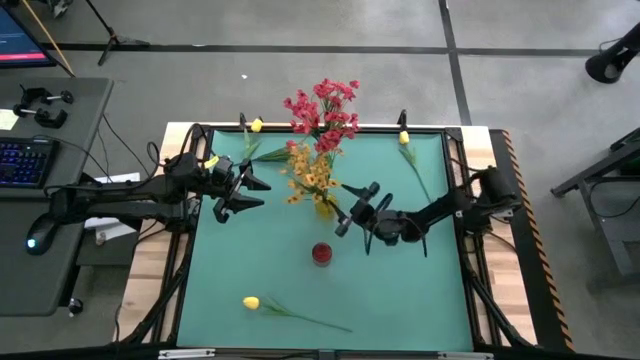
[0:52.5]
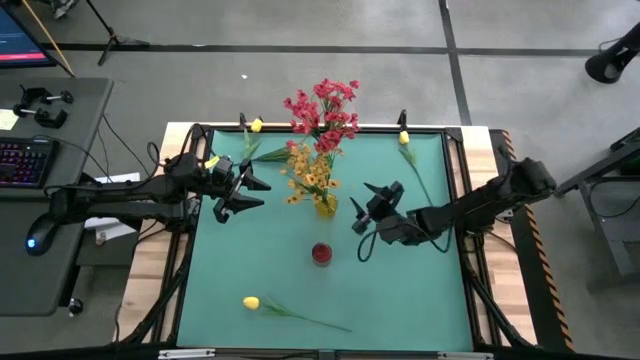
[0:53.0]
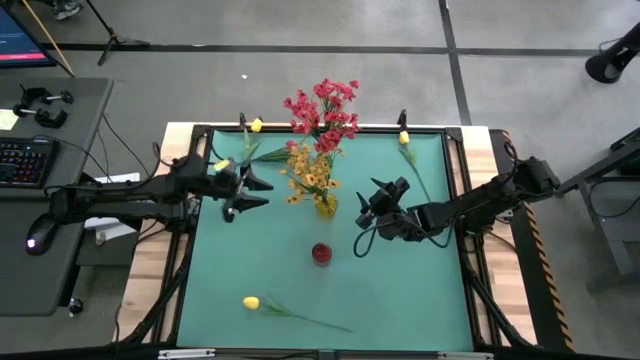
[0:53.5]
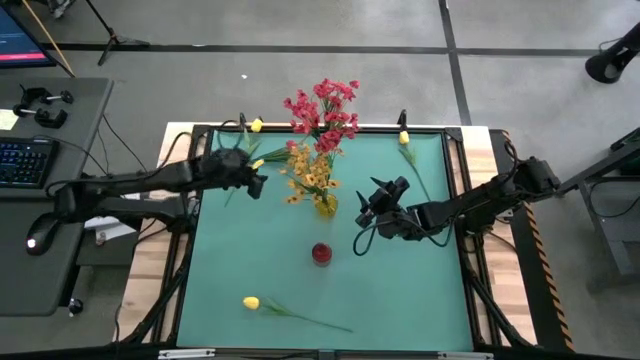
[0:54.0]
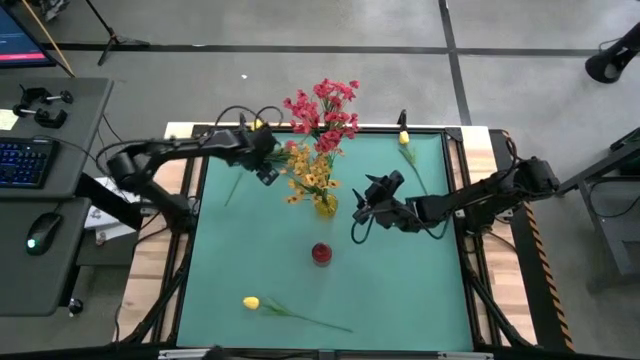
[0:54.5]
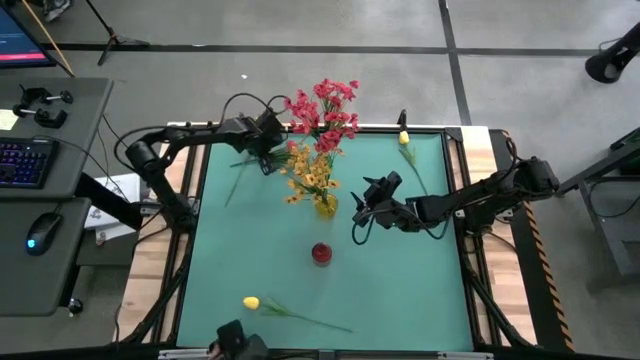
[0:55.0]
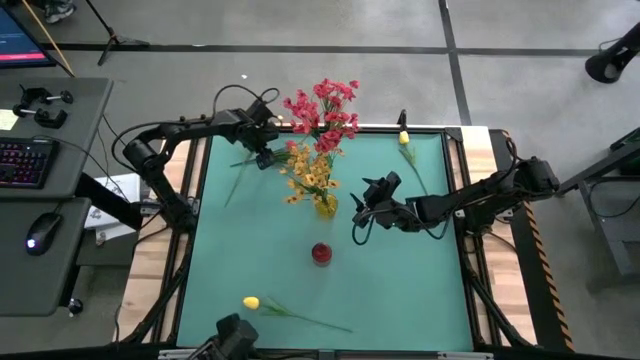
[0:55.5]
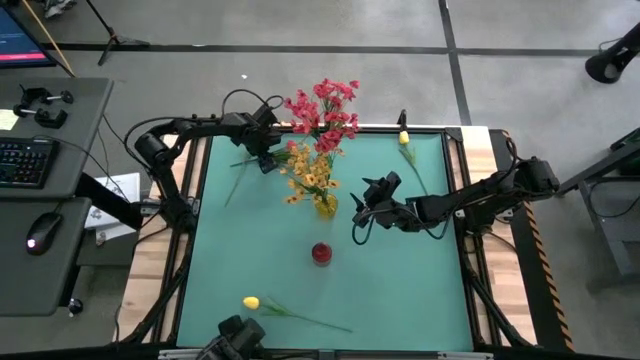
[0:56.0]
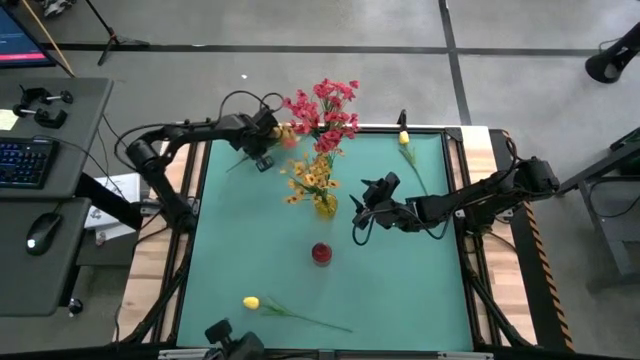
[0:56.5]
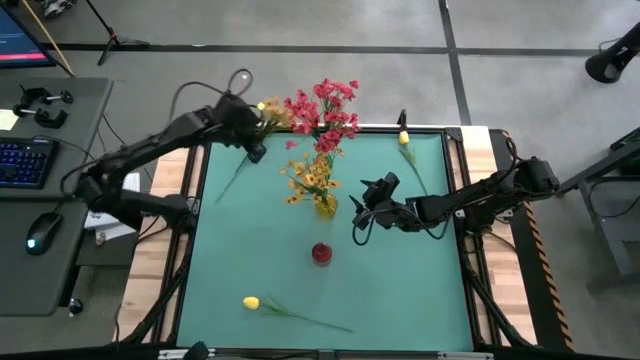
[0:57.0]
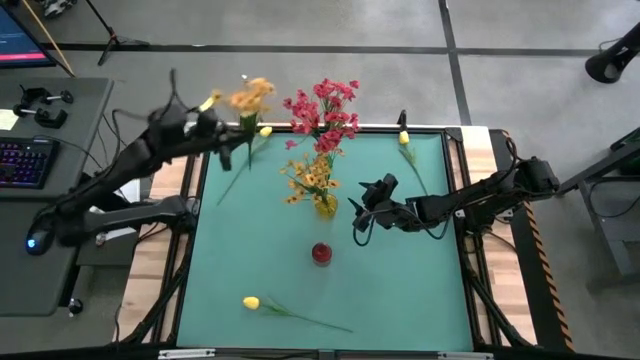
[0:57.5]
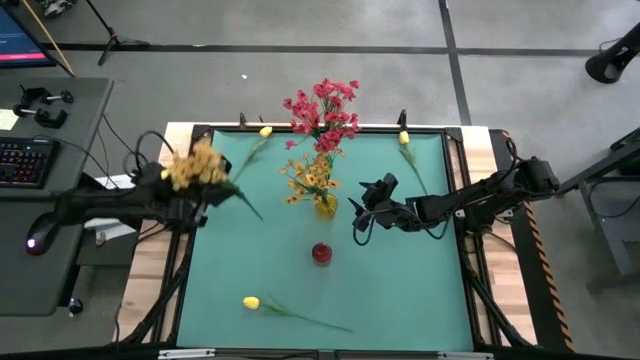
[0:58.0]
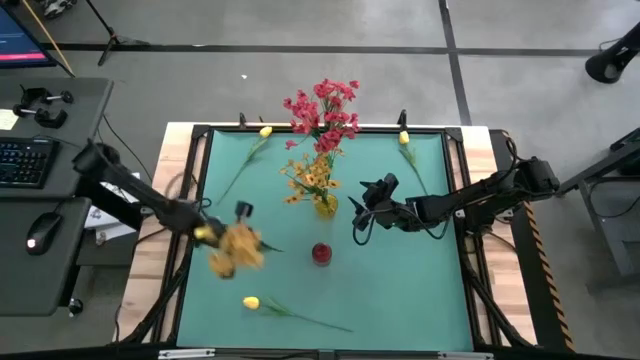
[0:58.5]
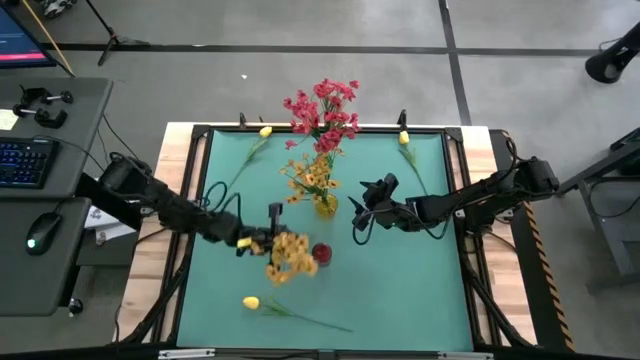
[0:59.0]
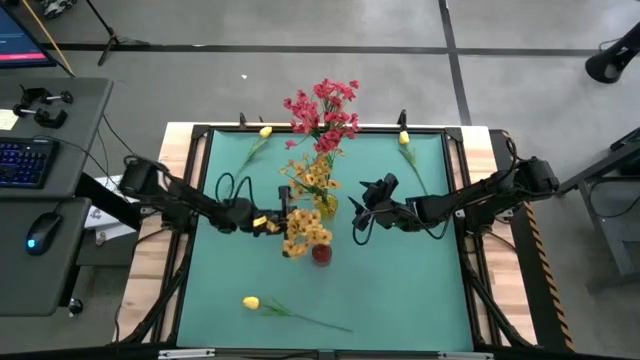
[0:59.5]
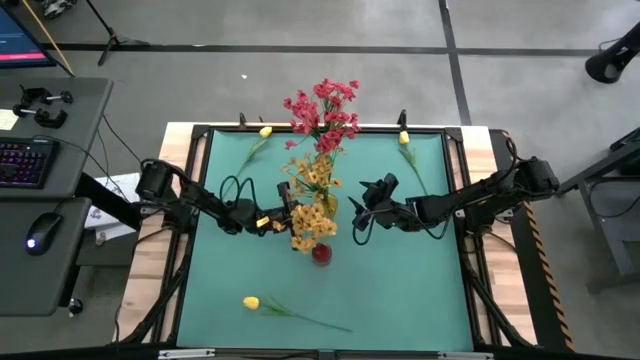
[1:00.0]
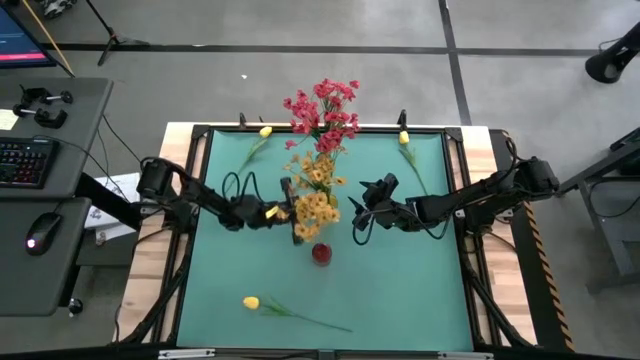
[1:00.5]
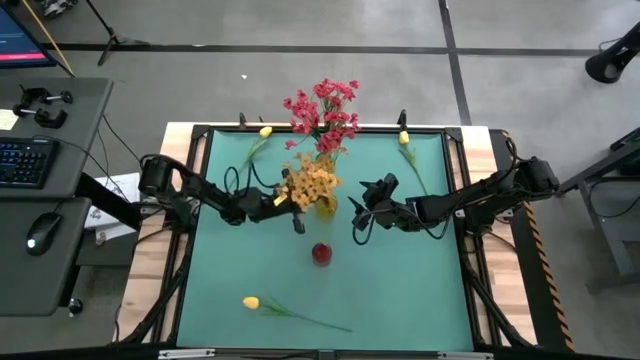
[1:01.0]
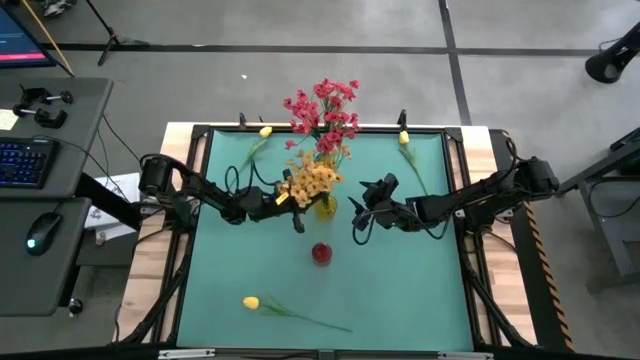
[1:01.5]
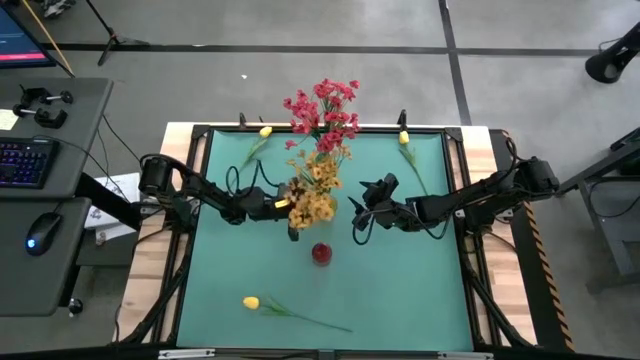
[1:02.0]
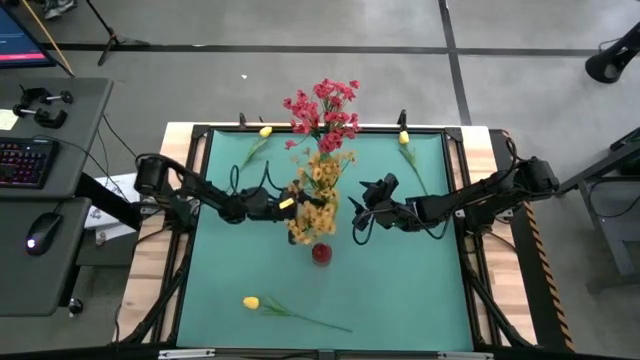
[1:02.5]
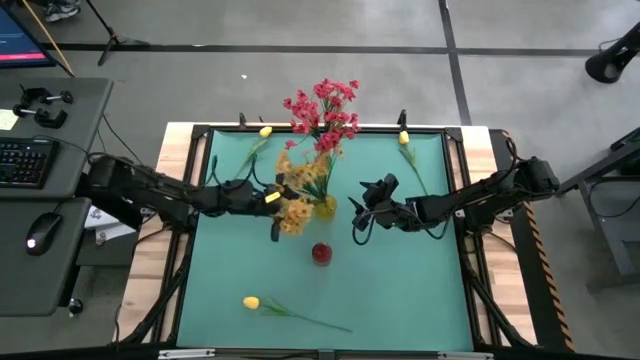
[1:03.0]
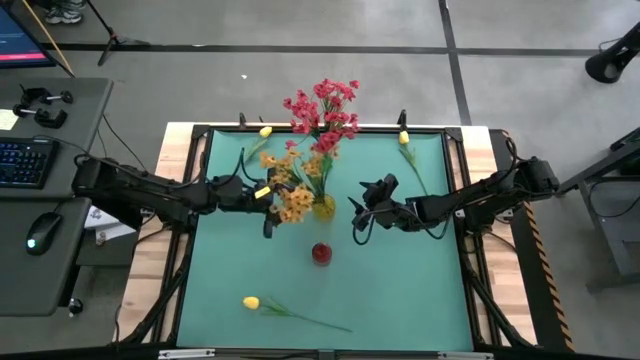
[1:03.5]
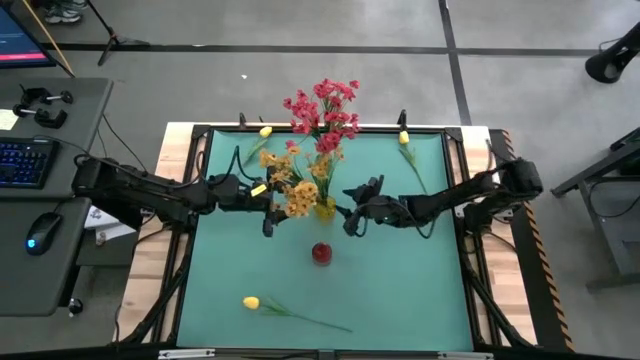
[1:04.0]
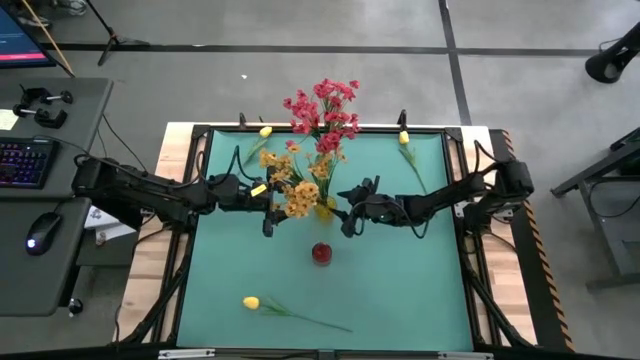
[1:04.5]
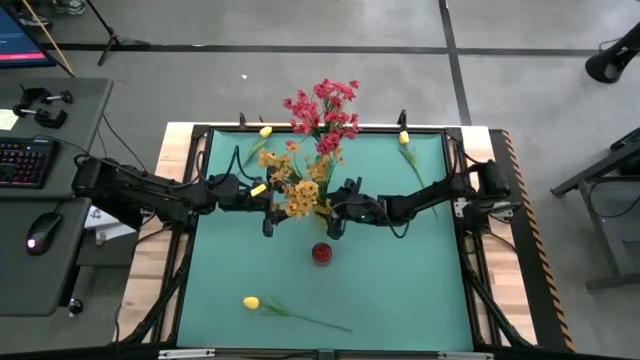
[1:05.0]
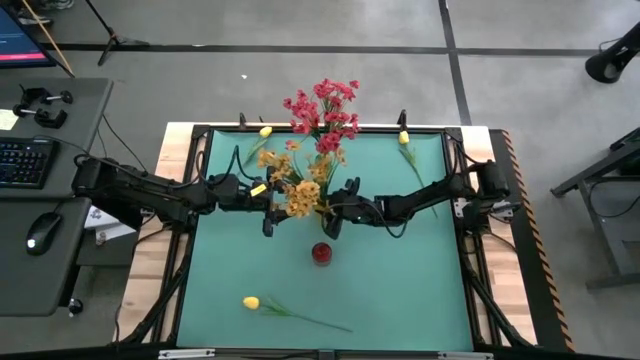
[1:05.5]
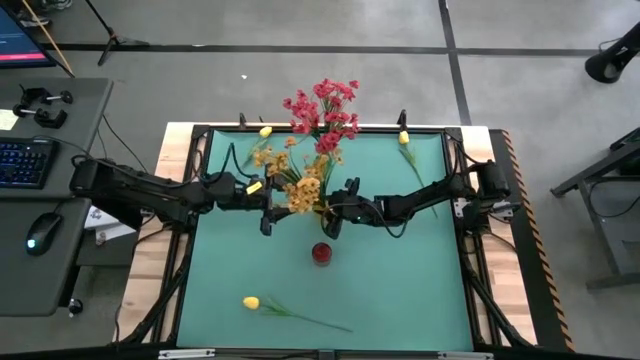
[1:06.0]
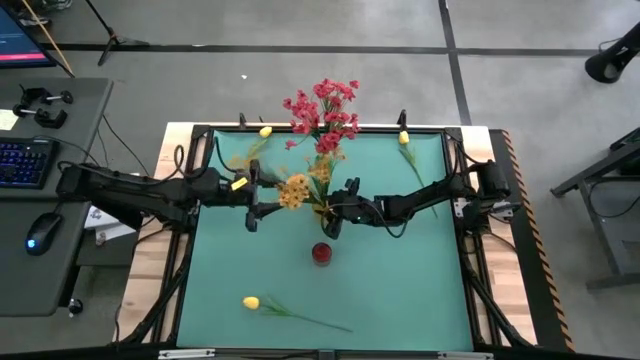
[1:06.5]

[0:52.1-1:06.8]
Task: Sort flowers into vase by color
Put the yellow flowers into the yellow vase

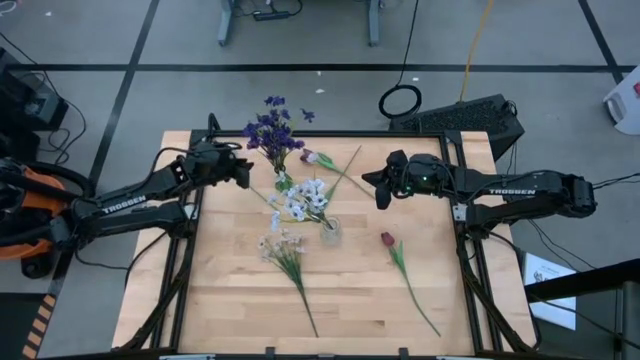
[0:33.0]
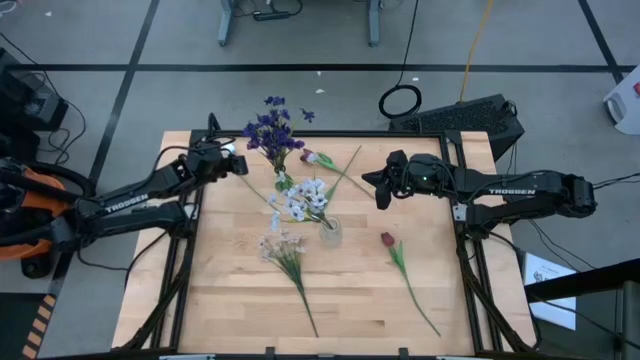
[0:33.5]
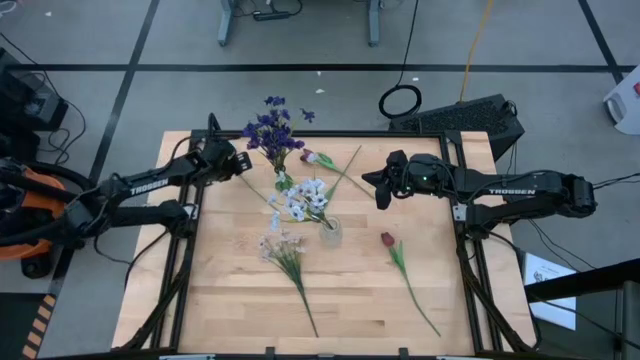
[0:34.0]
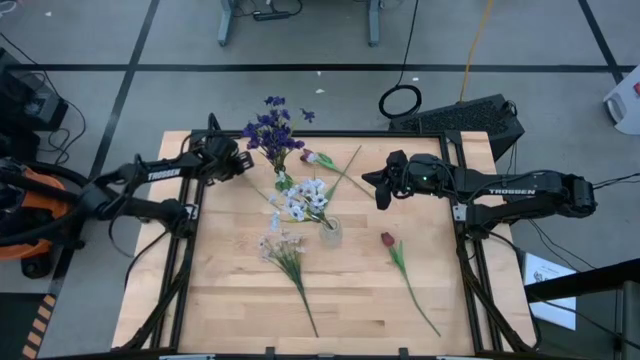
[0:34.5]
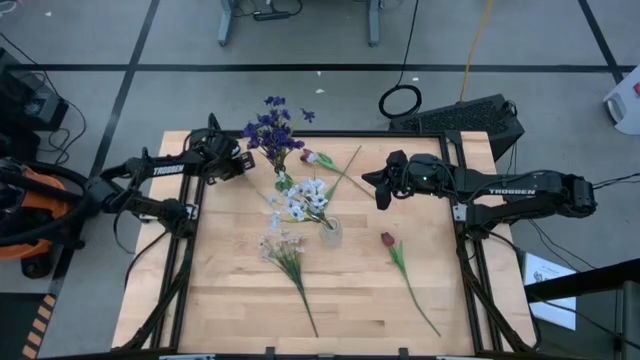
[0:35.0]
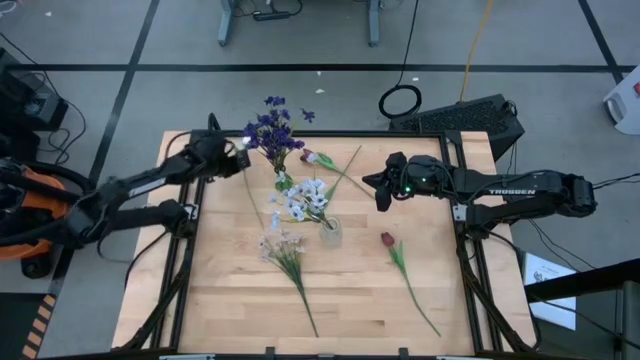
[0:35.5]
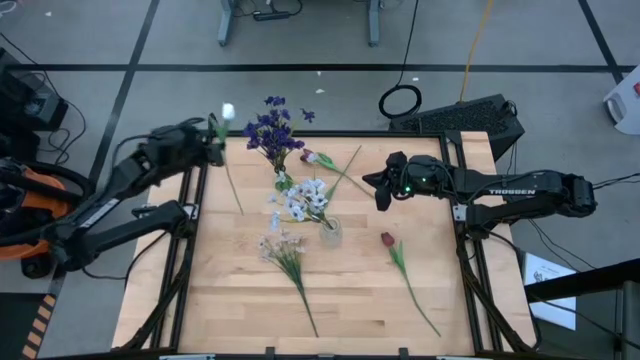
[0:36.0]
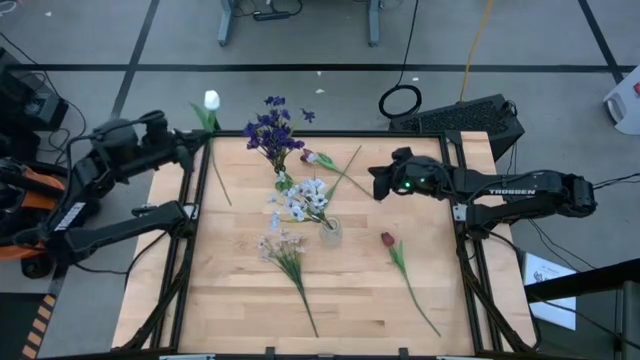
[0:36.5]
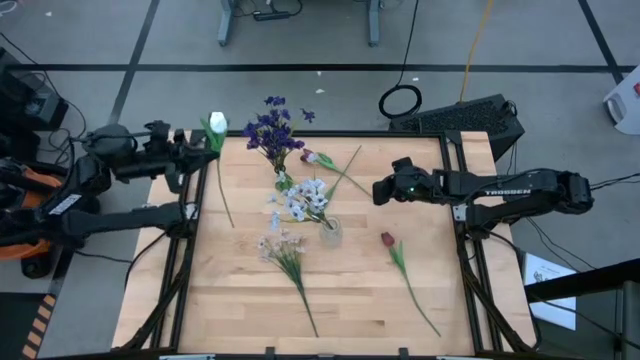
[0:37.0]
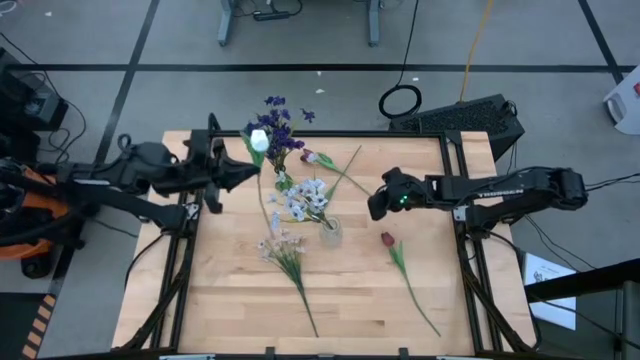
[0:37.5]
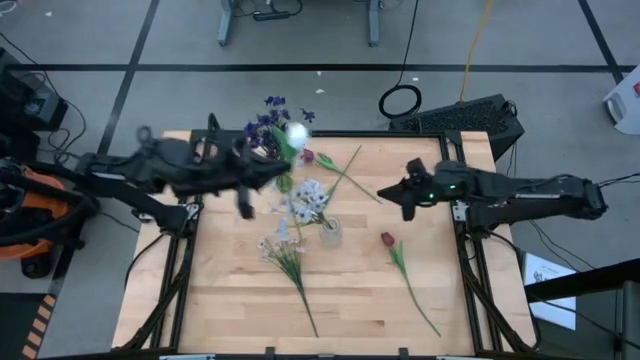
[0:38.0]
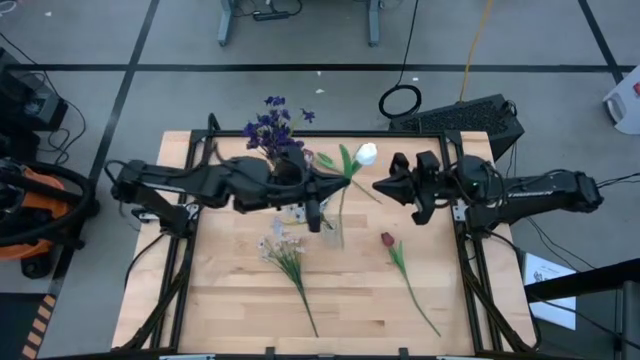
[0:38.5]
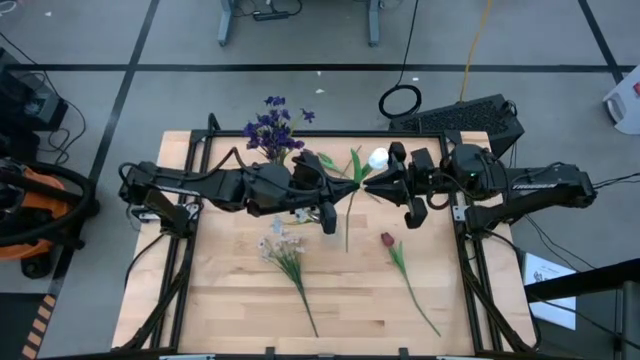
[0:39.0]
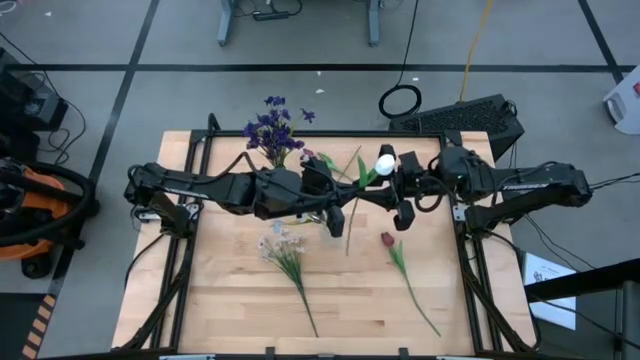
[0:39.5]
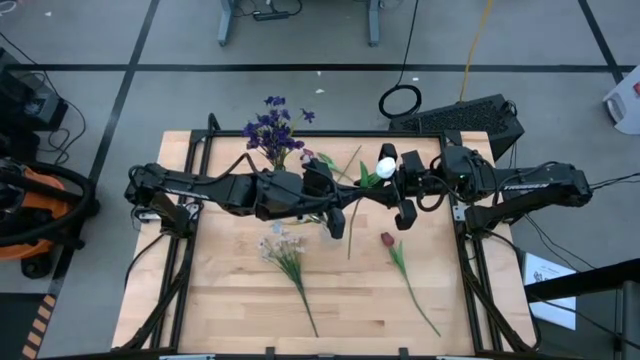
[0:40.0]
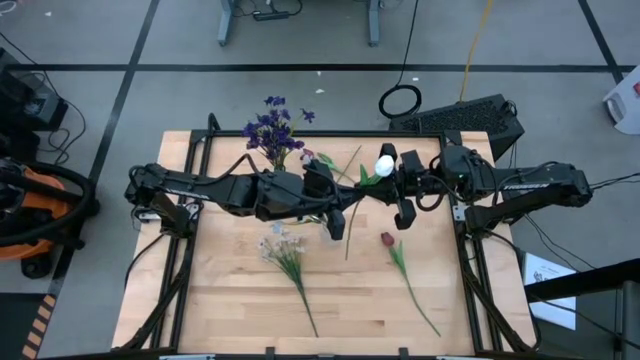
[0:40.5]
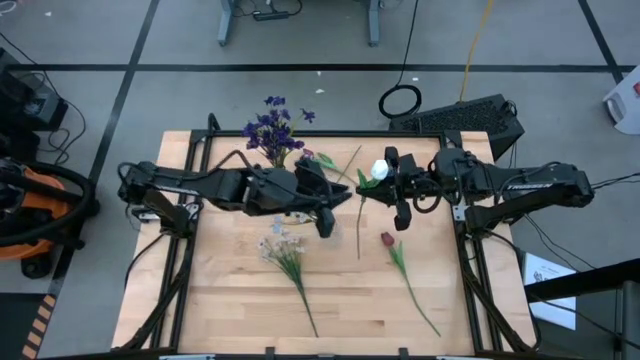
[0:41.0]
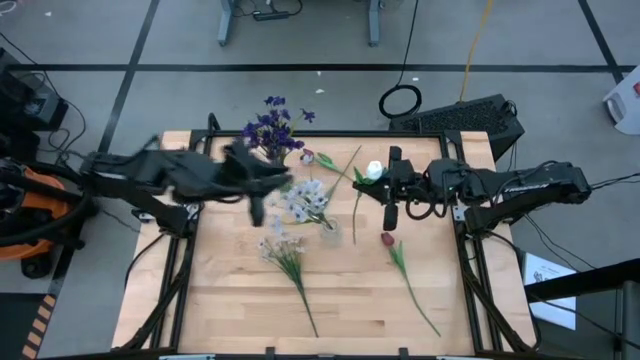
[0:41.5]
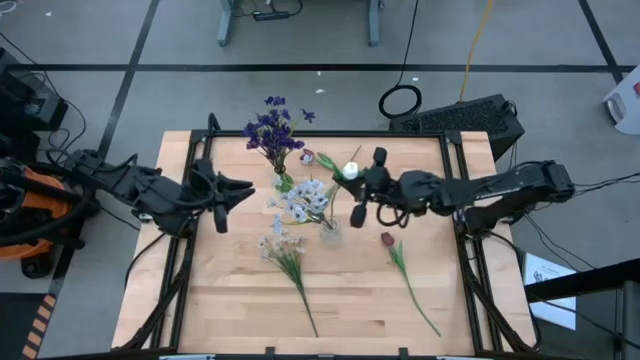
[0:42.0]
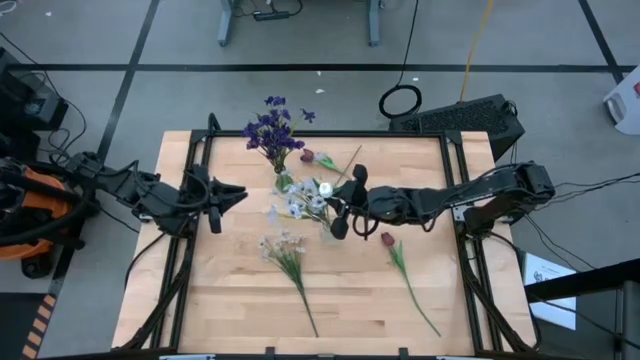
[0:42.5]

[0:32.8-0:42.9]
Task: Sort flowers into vase by color
Put the left white flower into the transparent vase
